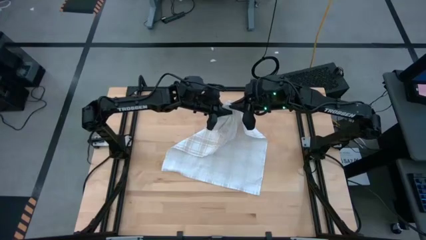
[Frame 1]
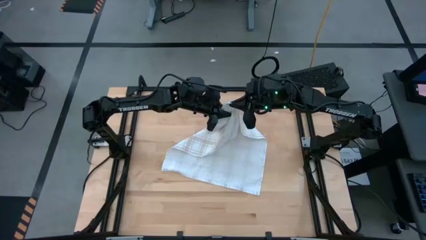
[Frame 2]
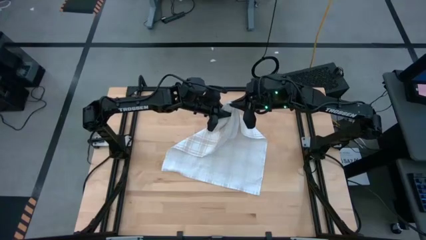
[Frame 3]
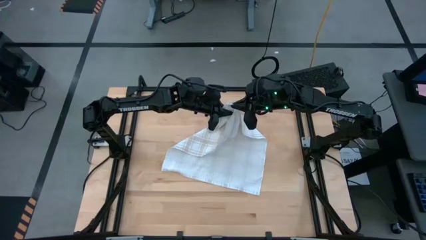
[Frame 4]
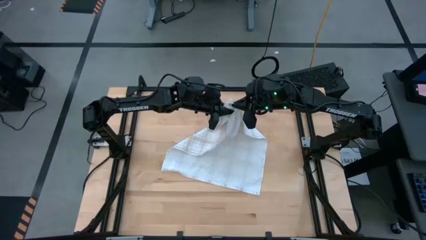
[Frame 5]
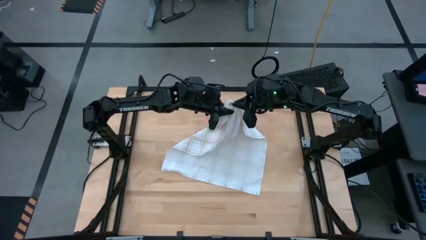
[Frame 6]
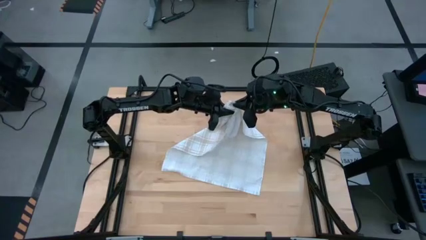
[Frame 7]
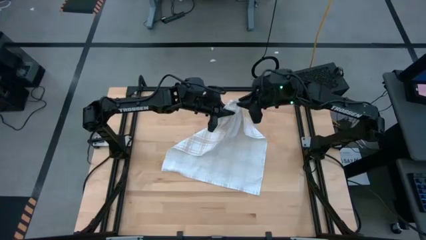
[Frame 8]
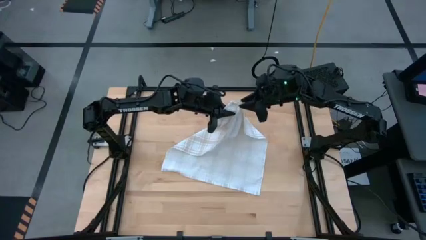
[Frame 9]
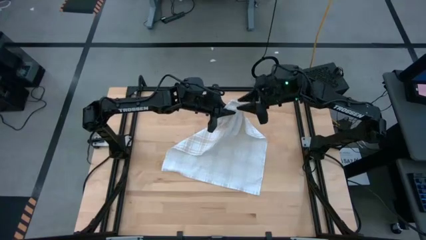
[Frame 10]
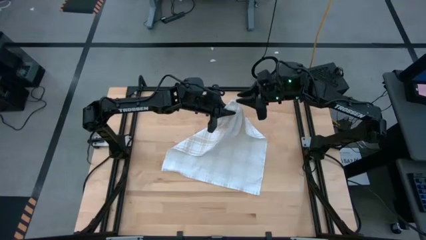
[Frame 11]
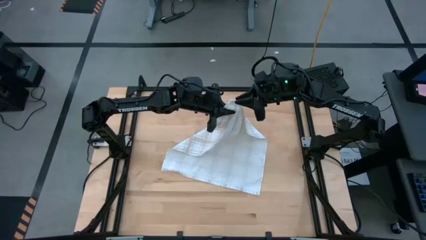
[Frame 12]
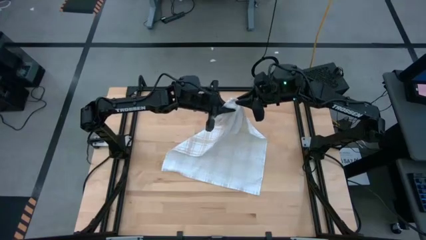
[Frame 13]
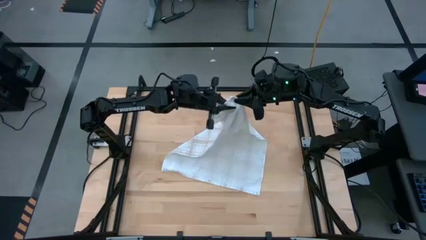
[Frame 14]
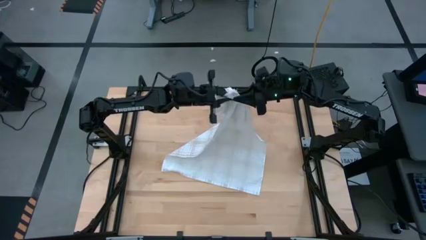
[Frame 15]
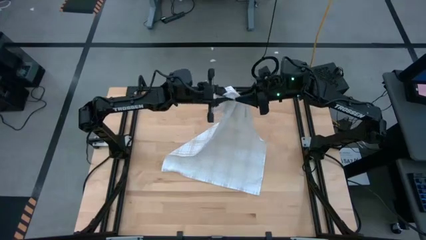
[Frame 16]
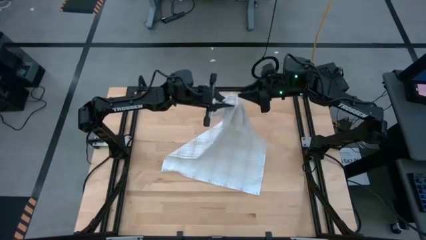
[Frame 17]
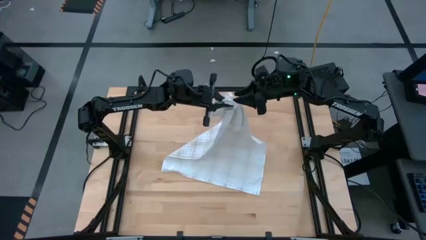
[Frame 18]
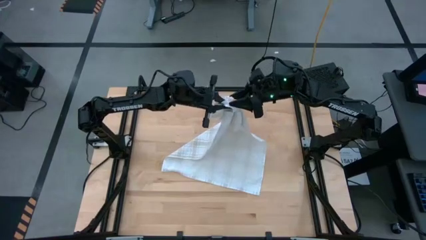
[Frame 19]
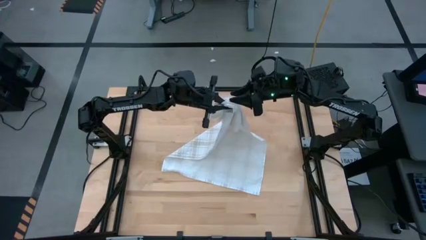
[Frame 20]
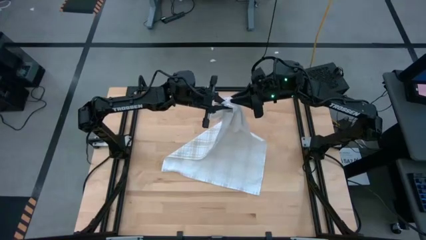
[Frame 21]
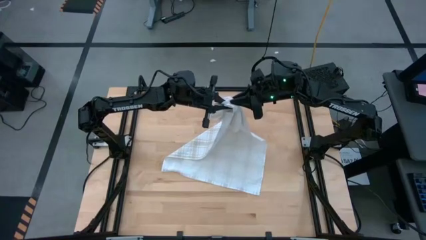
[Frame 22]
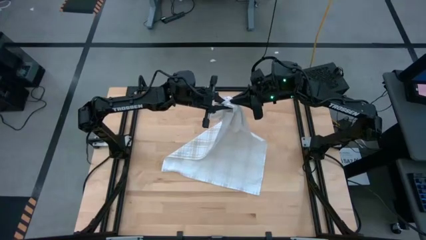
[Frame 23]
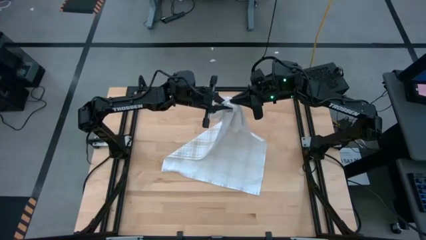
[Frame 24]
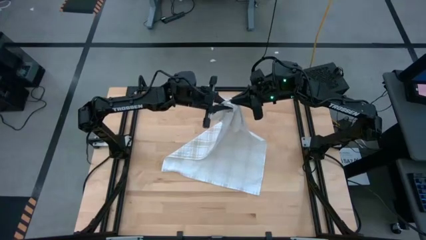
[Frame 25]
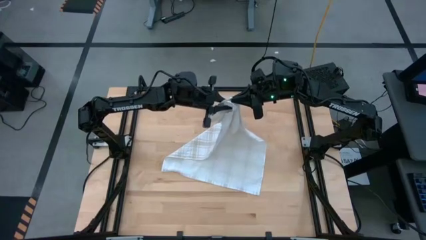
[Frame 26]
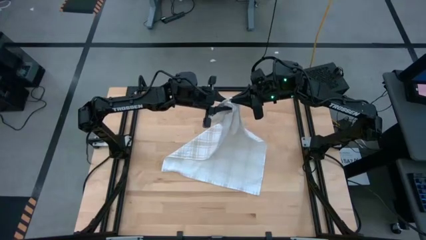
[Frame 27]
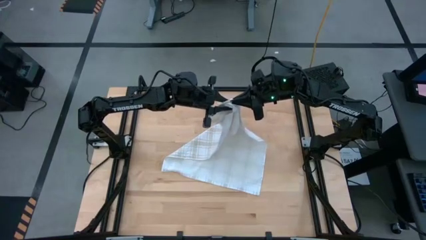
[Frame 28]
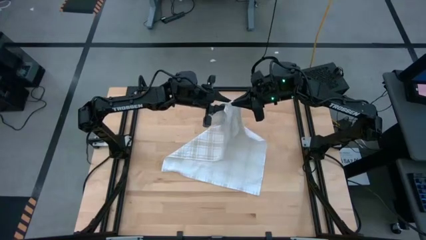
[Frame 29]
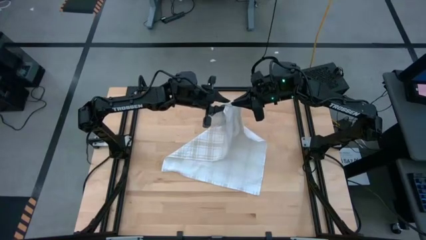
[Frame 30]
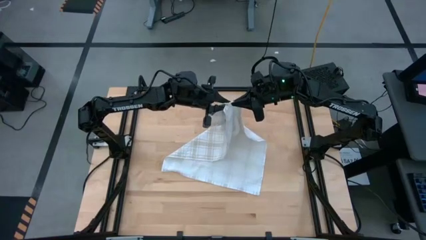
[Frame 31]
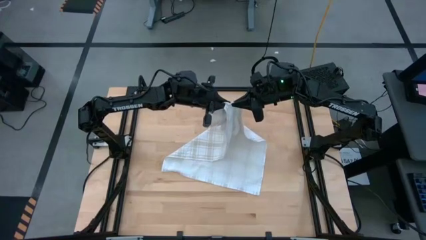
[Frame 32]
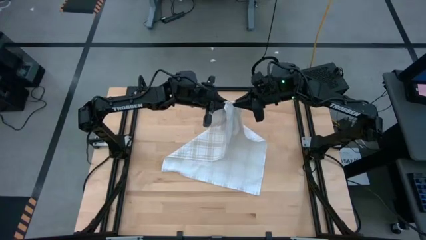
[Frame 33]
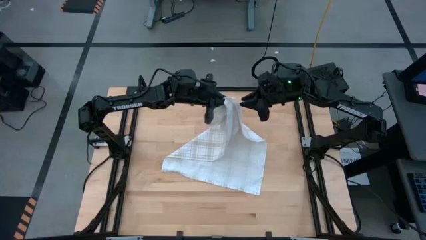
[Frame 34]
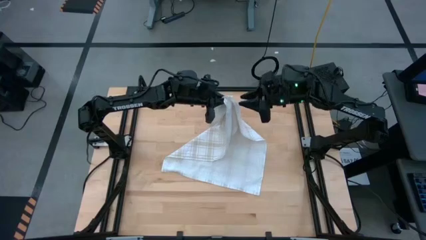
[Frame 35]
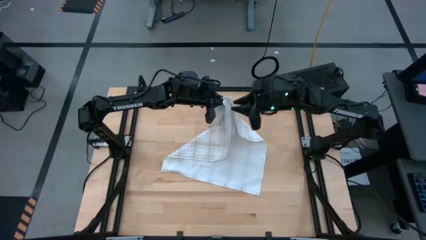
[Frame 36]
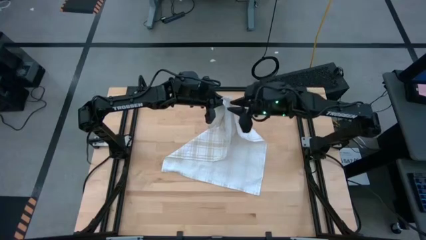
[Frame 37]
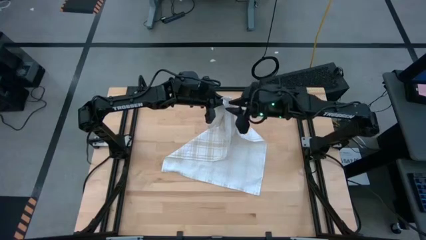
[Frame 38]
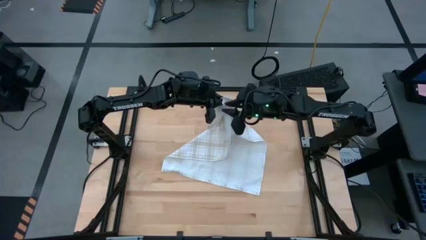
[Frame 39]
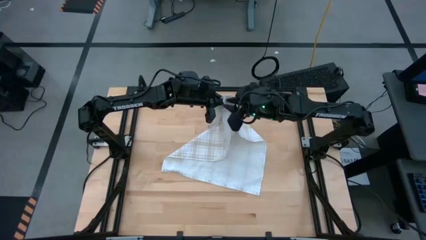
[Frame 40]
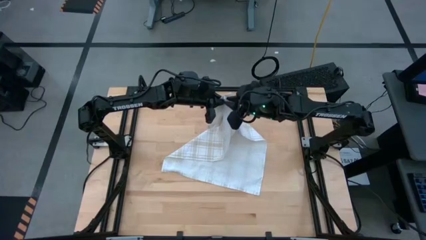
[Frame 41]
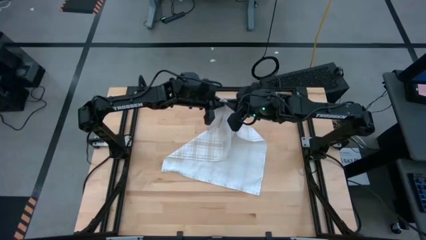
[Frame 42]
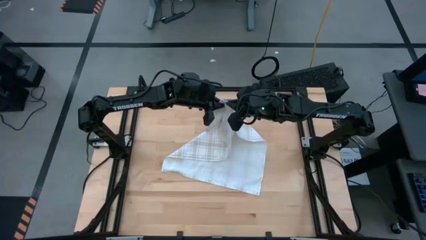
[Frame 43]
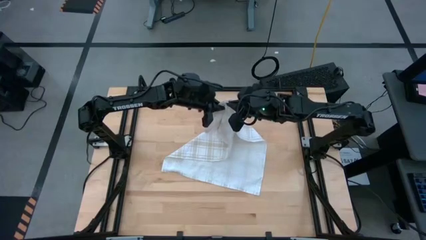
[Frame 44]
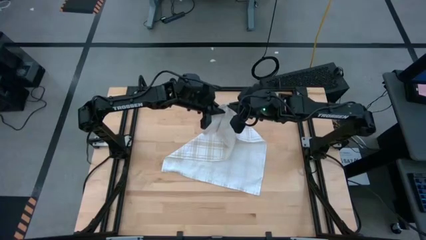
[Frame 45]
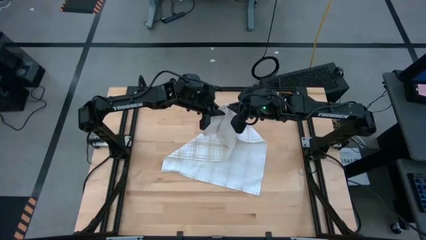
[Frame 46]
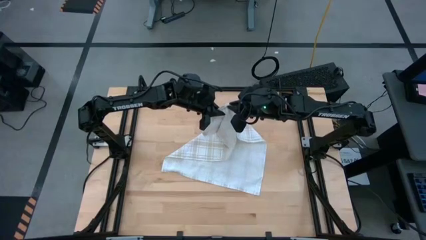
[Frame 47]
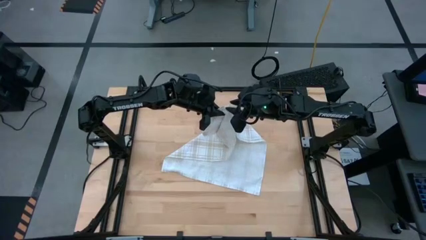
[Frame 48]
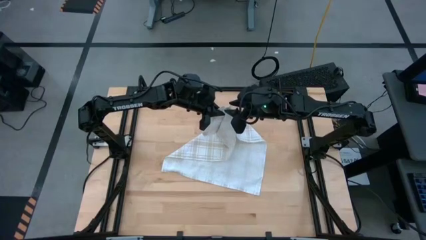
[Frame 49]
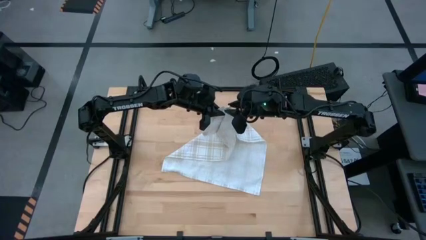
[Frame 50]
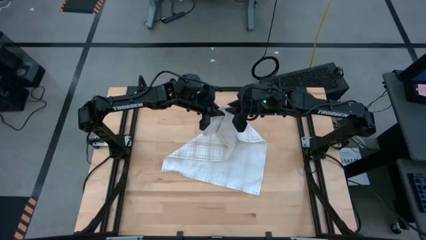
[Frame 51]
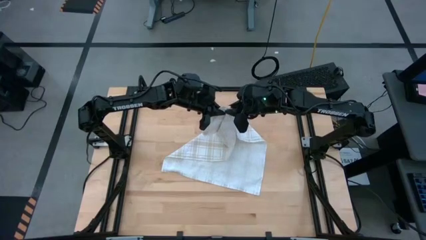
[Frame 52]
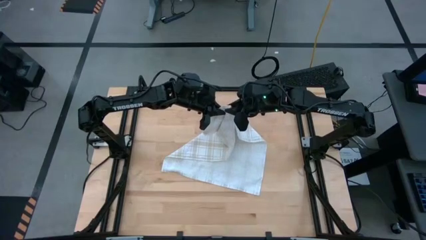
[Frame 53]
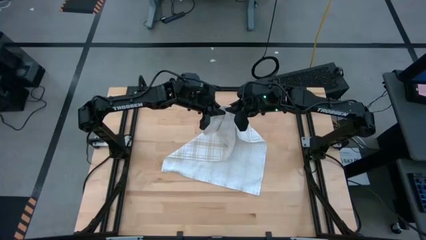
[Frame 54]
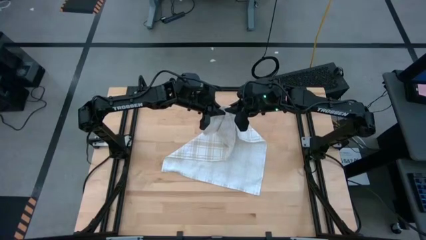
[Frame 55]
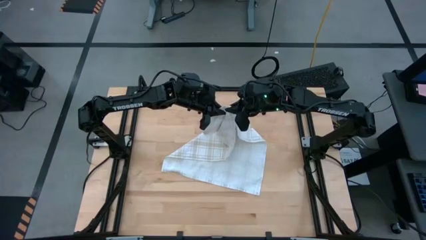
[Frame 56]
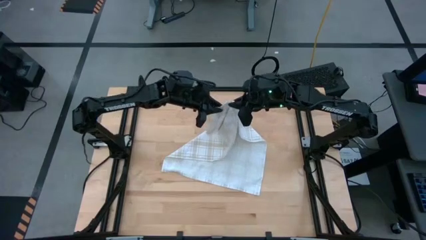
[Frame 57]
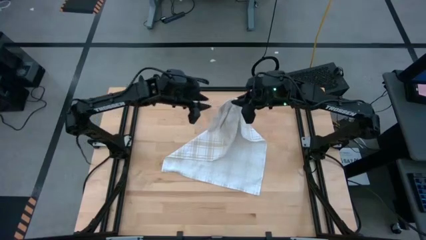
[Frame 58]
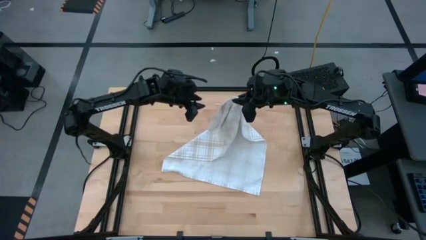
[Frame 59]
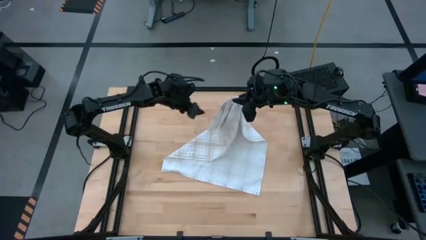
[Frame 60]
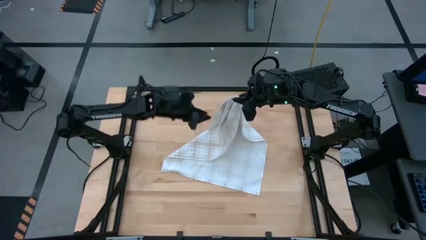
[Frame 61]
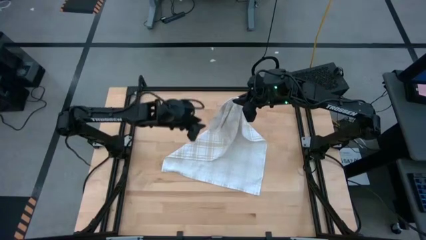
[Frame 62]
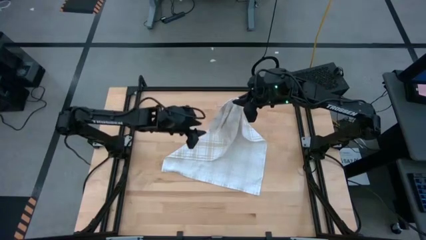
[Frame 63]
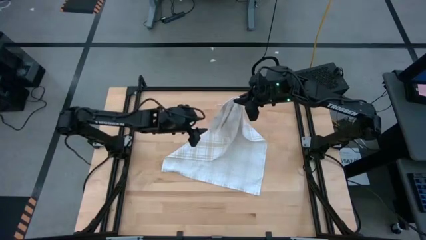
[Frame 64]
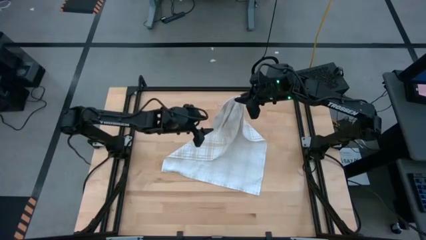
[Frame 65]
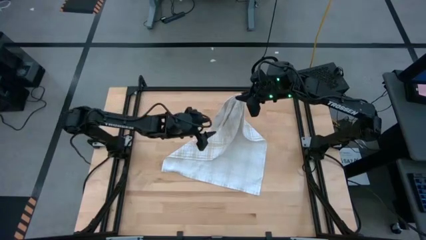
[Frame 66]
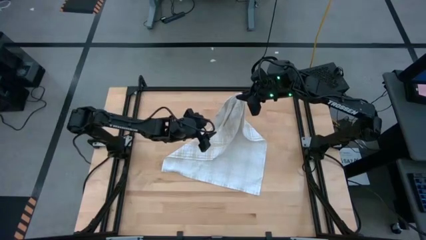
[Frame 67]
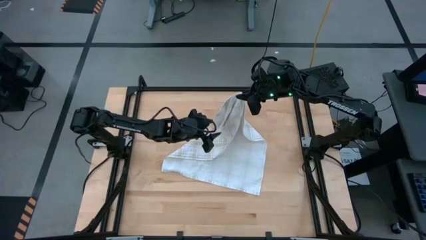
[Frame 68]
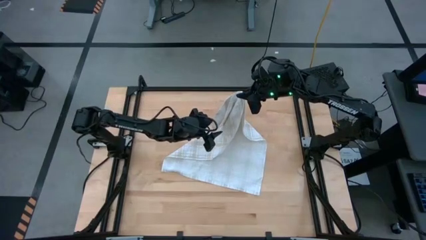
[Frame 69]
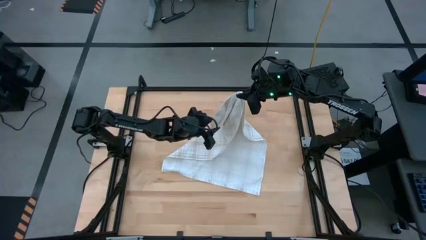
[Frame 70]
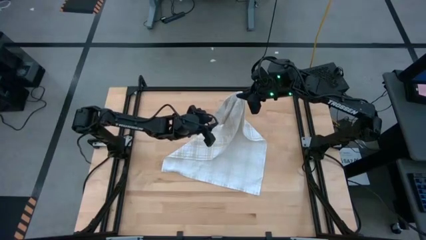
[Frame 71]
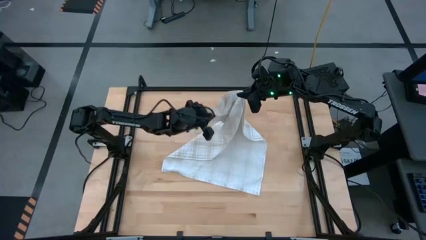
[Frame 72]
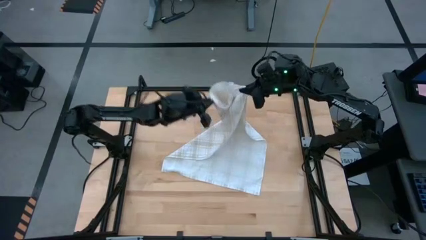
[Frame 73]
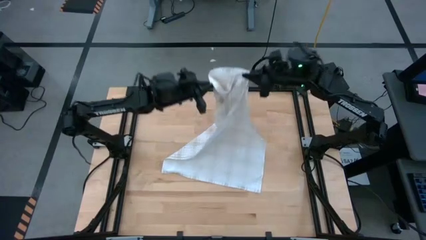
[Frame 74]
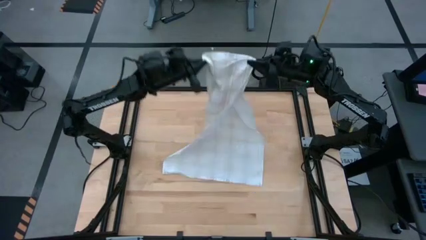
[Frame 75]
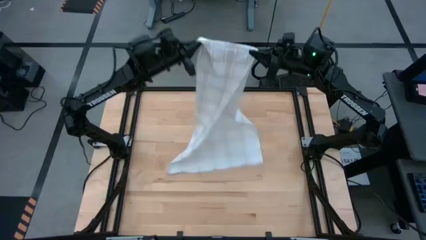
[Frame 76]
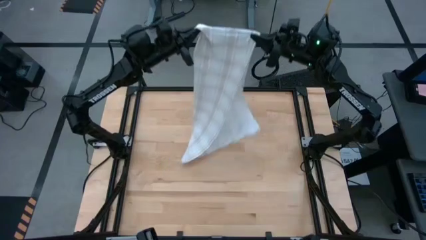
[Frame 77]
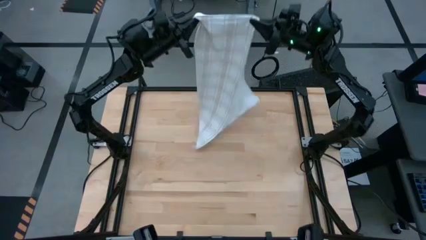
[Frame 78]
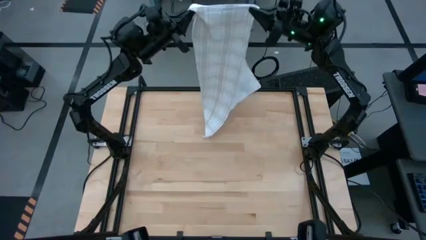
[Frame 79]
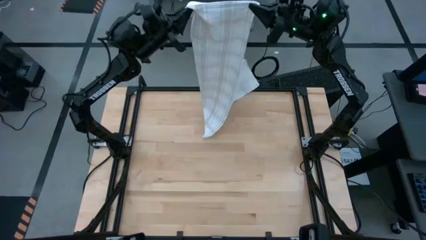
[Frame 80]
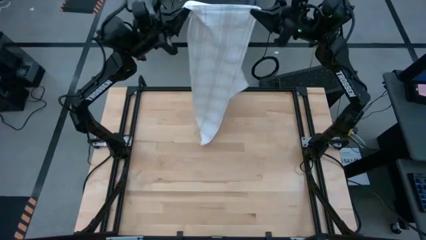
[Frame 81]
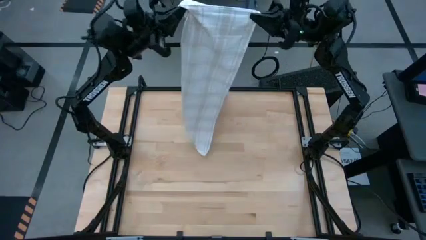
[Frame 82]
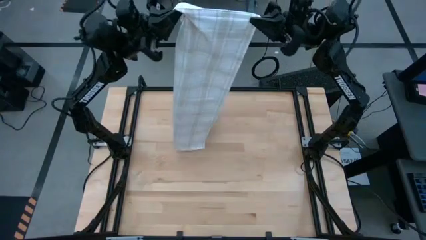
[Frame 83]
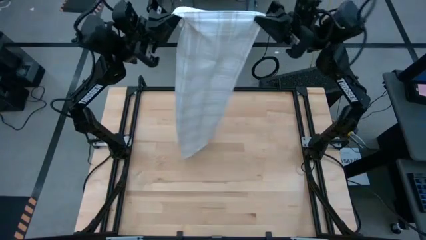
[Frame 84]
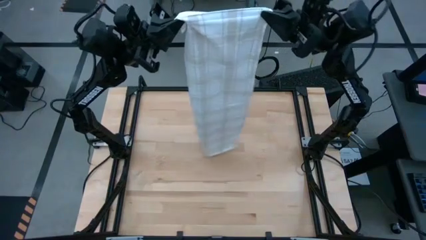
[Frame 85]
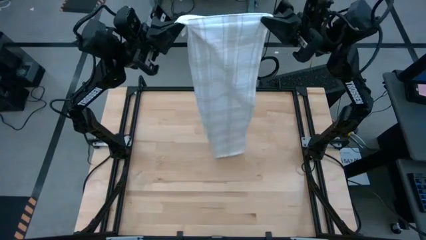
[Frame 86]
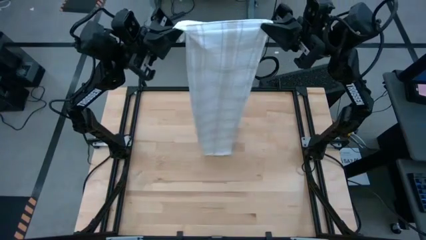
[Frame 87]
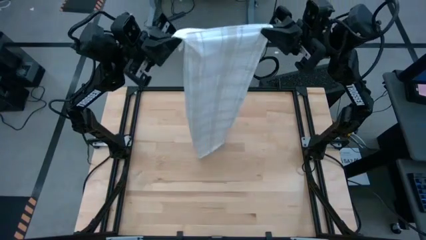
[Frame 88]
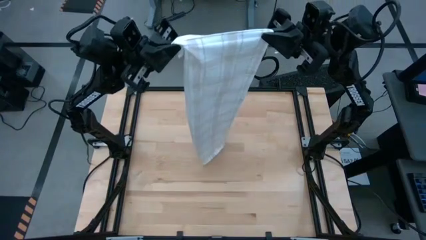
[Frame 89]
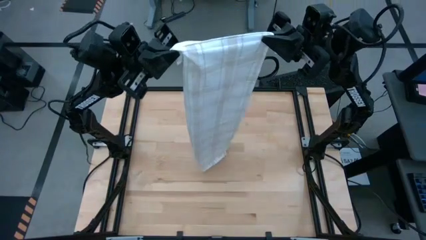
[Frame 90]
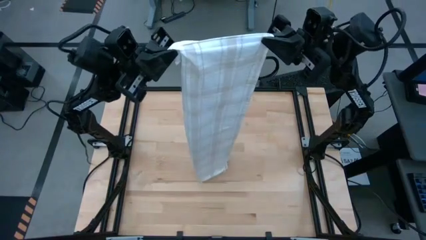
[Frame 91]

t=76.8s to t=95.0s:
Task: Roll towel into tight, uniform cylinder
Roll the white towel
